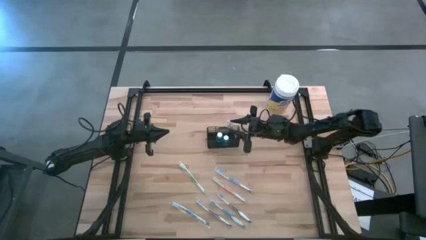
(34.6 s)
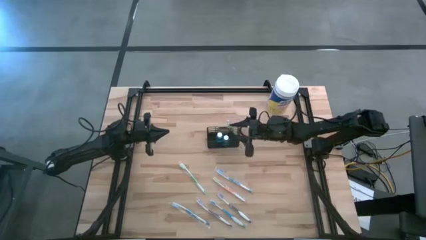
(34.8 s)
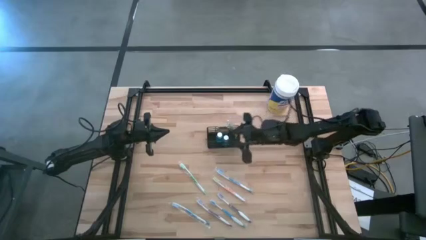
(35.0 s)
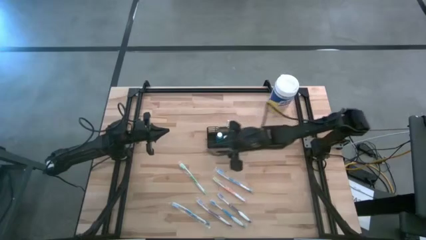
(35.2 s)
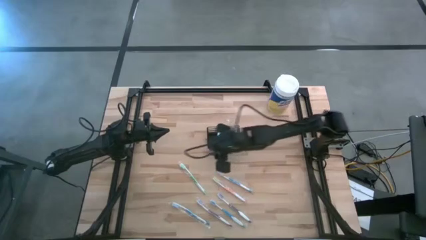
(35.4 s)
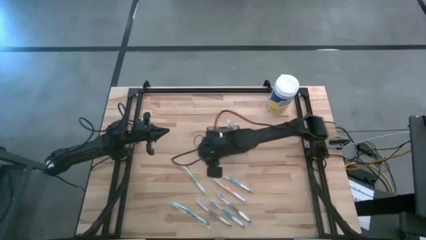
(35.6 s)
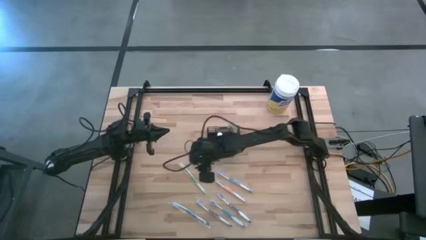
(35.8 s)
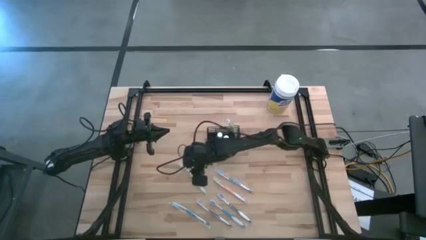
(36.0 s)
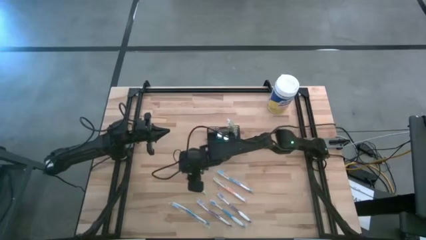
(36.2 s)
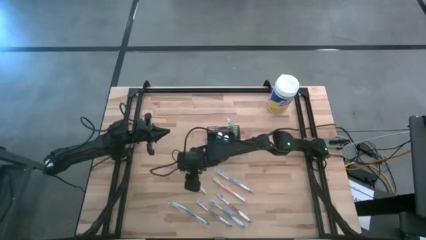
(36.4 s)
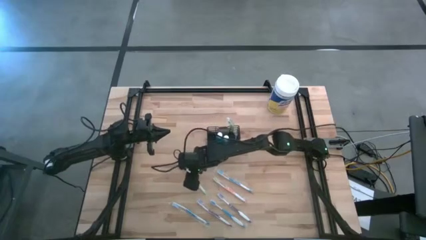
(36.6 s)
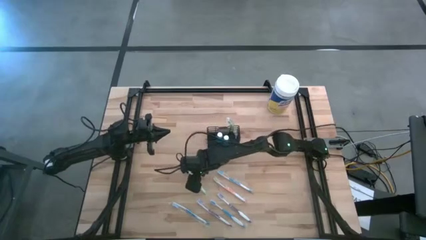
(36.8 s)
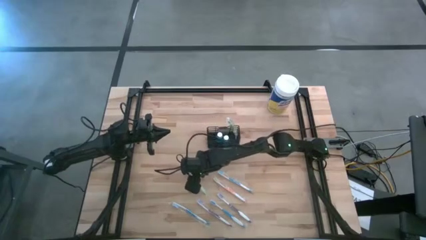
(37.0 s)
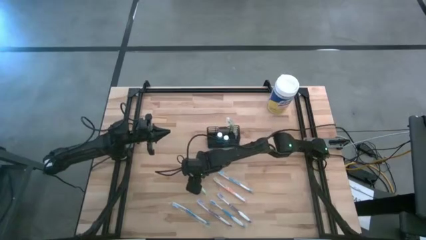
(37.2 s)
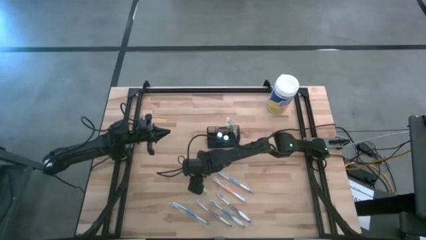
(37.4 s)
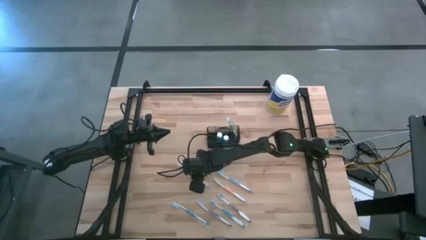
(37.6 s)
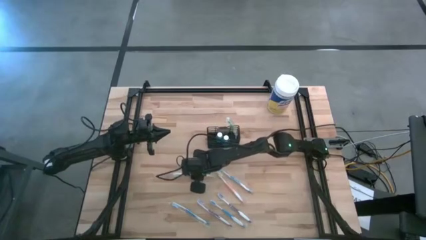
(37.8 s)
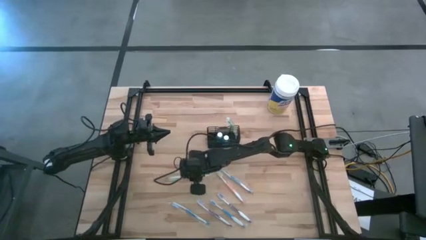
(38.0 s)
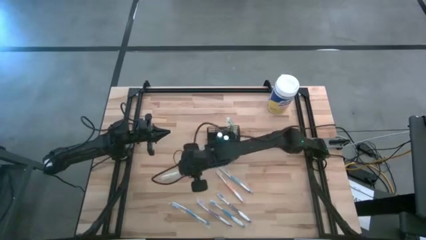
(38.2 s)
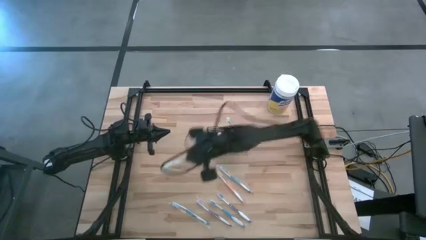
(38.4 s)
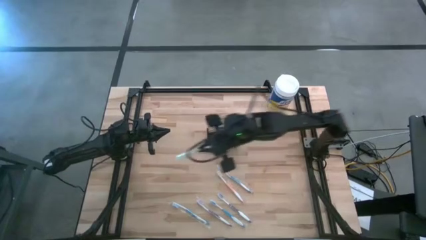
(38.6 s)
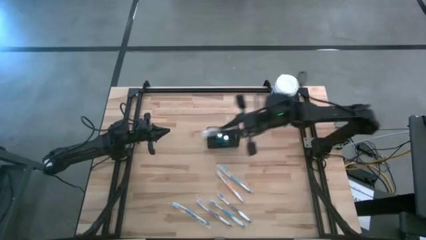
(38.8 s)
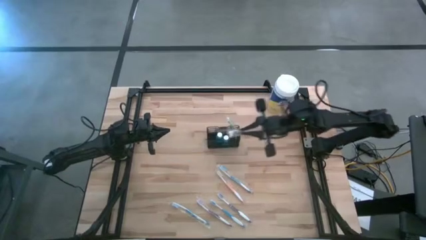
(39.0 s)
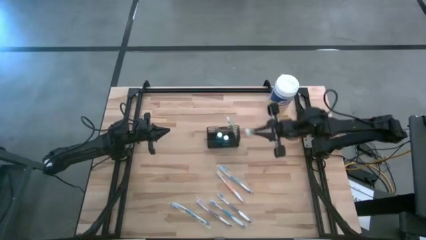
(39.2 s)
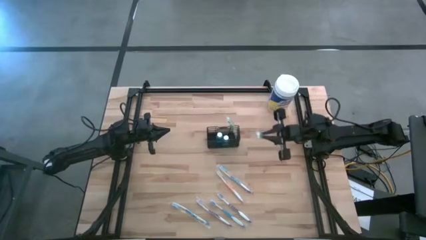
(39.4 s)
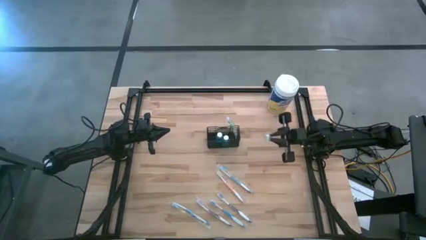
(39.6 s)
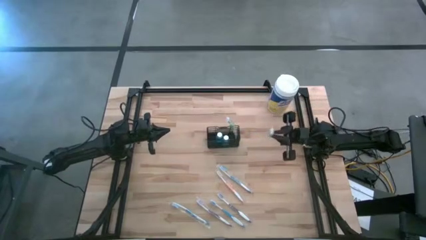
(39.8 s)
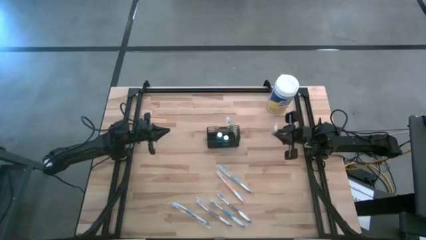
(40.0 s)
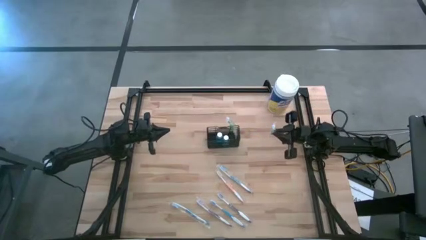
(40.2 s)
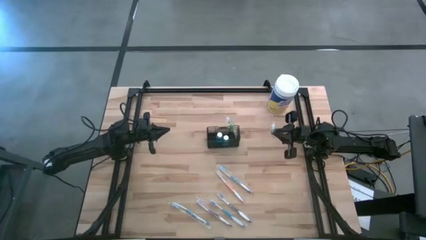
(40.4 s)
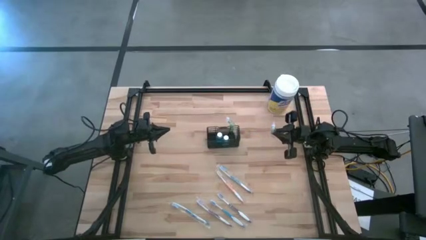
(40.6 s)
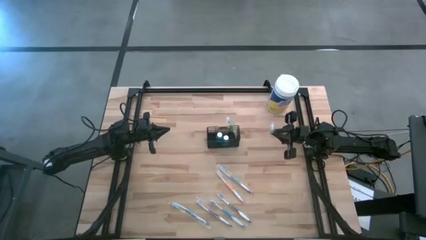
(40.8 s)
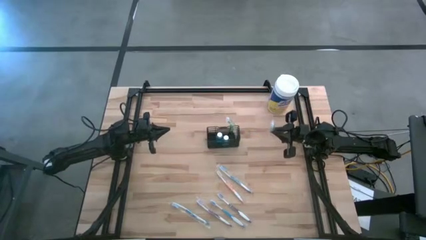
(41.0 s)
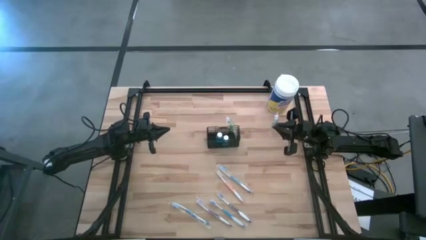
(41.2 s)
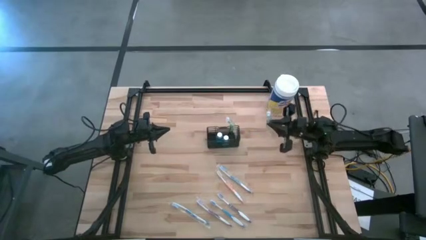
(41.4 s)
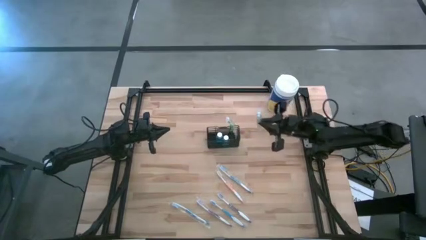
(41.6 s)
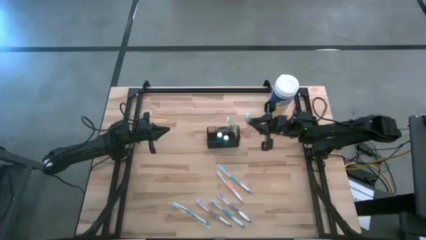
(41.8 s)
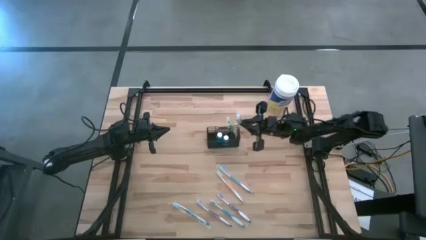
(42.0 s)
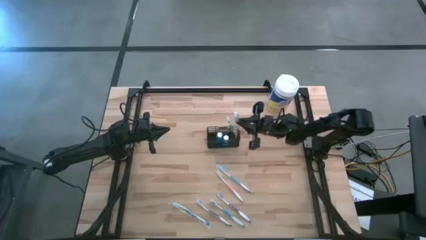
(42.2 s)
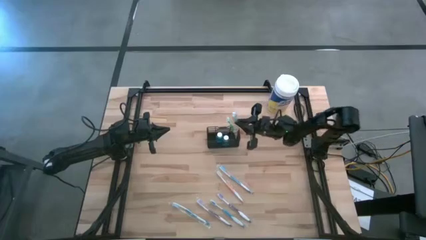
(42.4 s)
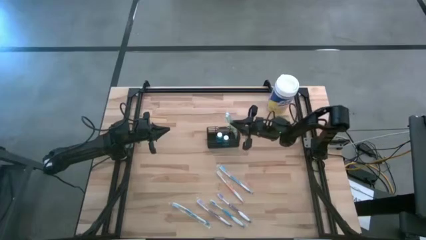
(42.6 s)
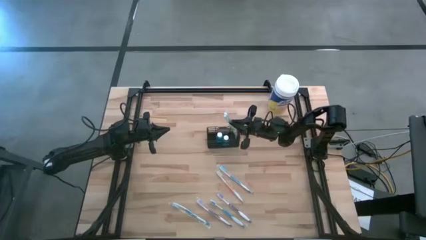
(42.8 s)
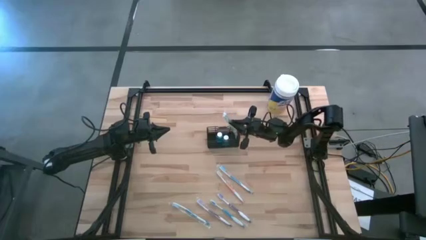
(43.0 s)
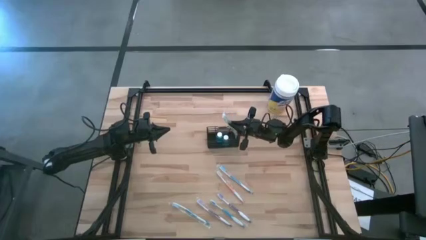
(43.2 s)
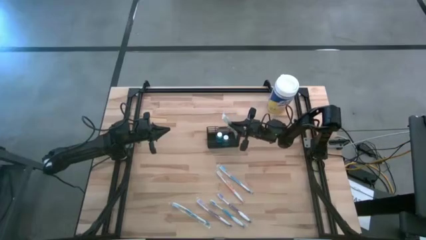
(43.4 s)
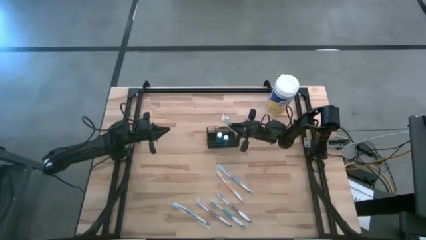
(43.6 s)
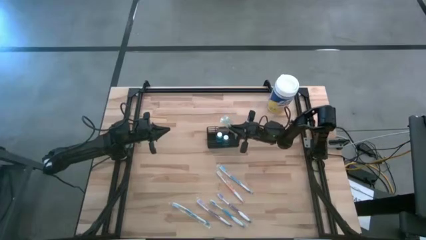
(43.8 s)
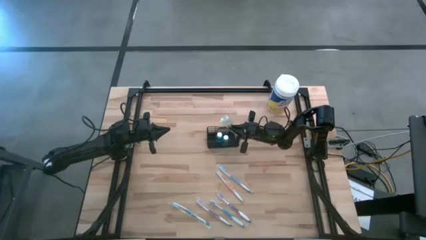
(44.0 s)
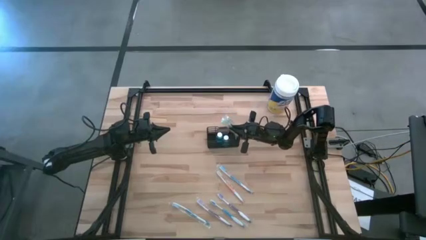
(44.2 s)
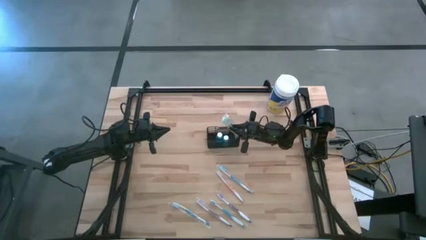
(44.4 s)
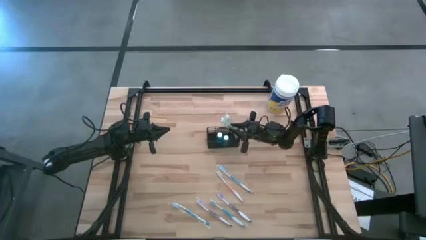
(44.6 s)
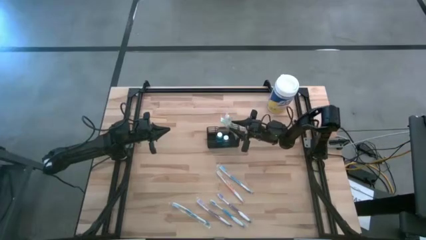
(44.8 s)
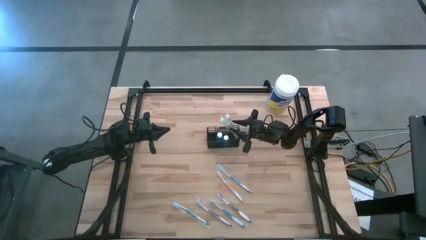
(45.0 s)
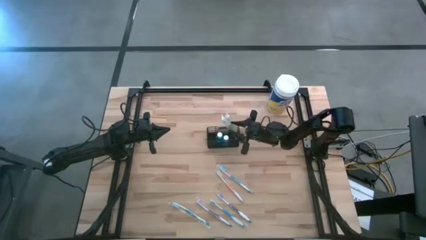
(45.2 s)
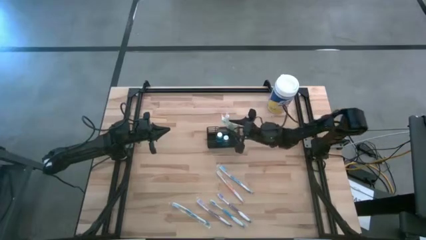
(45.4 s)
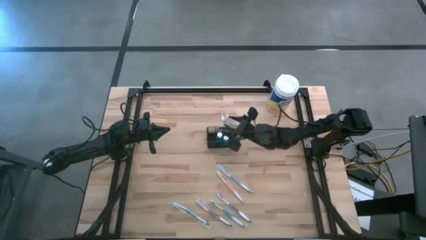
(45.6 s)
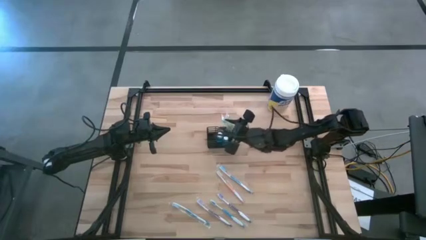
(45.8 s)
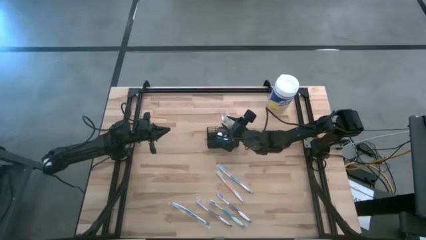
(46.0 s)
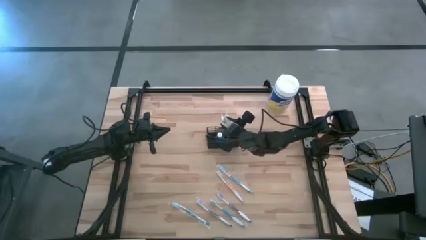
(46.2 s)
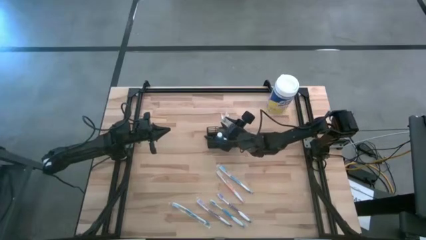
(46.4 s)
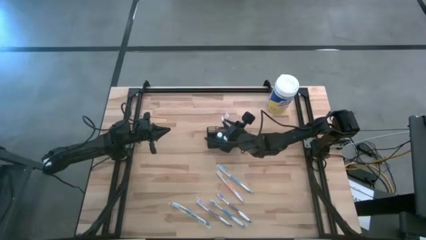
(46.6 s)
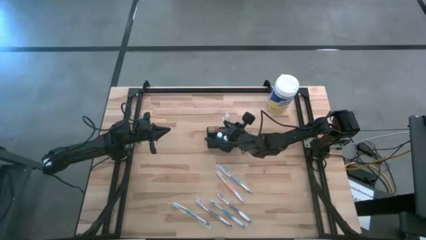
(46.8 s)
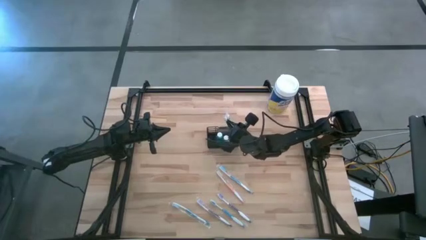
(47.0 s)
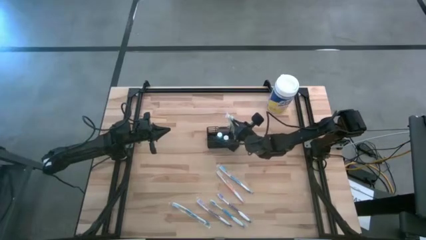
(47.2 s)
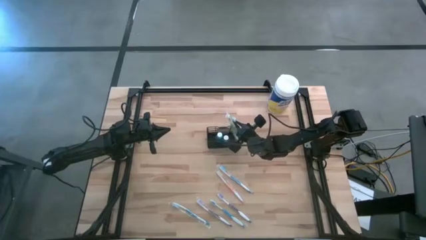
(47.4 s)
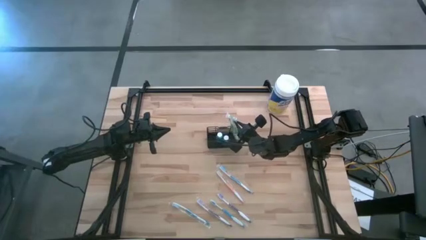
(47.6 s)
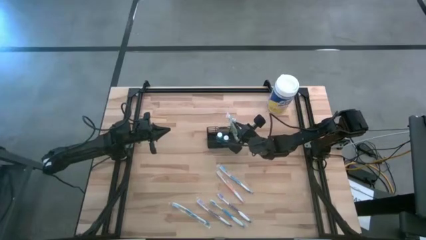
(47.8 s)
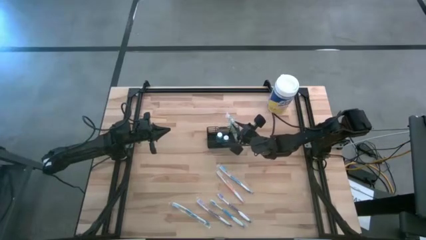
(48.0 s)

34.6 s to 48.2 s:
Task: Pick & Place toothbrushing station
Put the green toothbrush into the wire organizer
